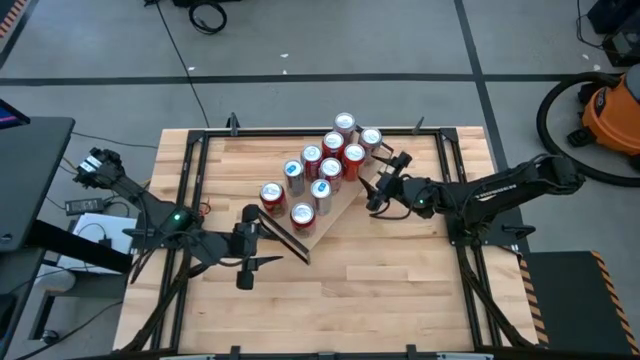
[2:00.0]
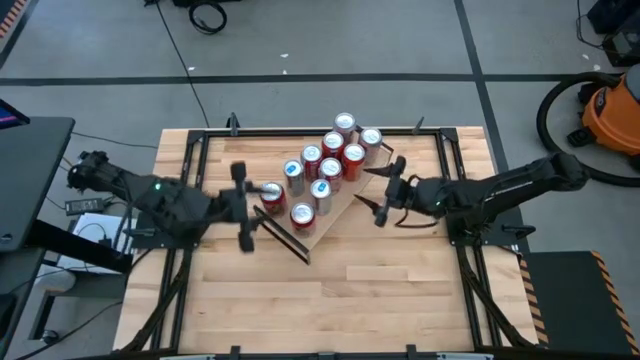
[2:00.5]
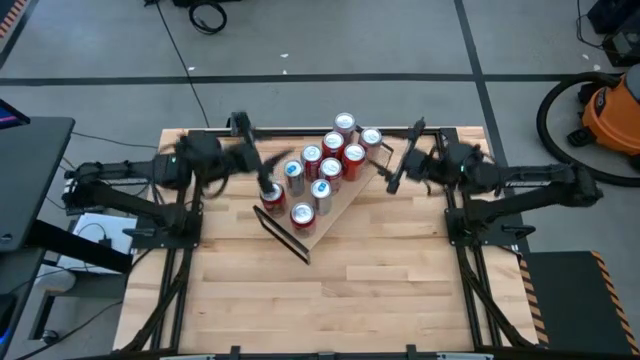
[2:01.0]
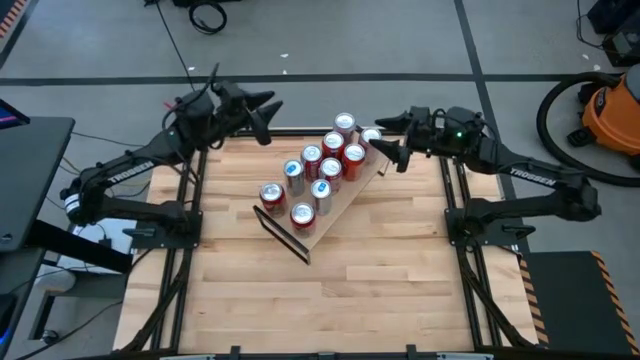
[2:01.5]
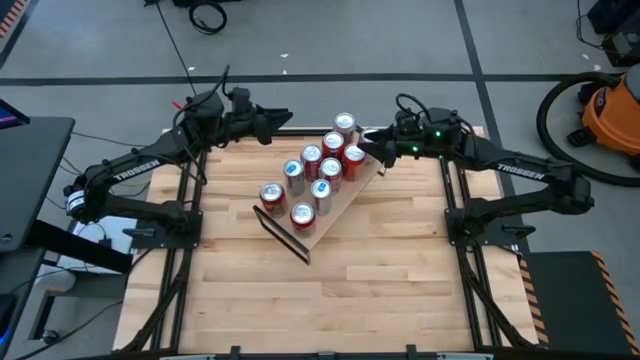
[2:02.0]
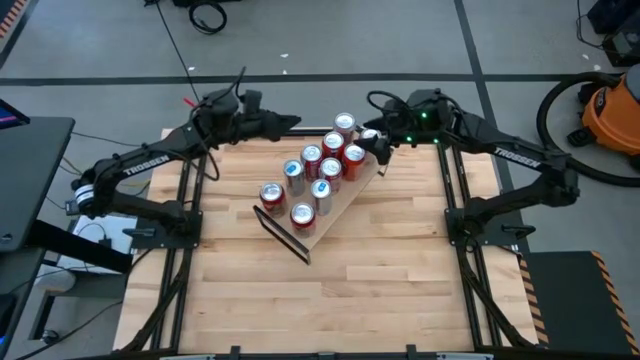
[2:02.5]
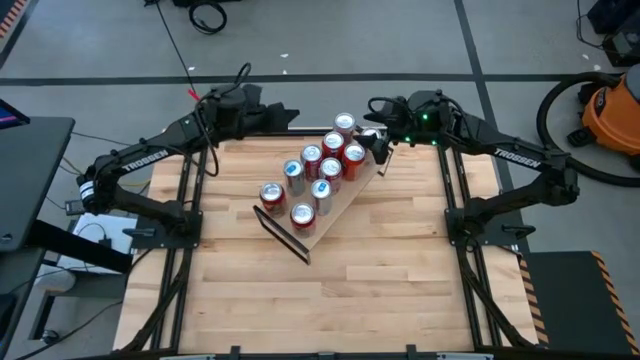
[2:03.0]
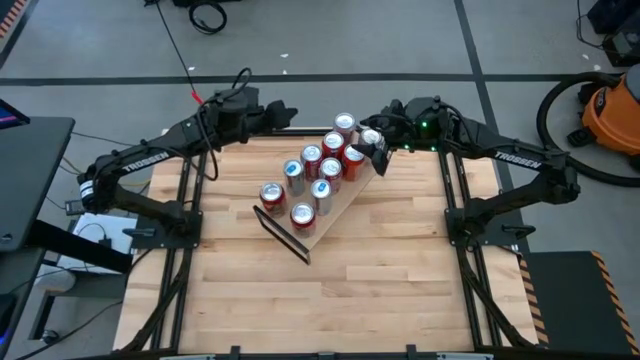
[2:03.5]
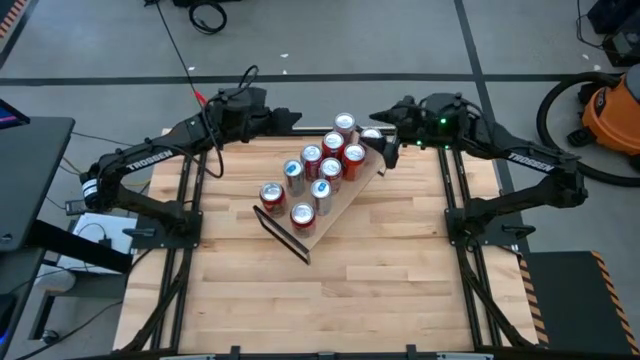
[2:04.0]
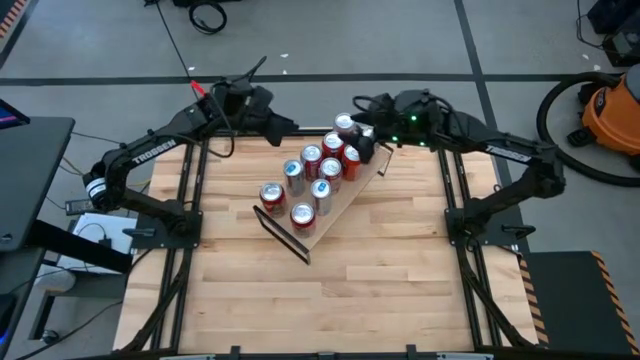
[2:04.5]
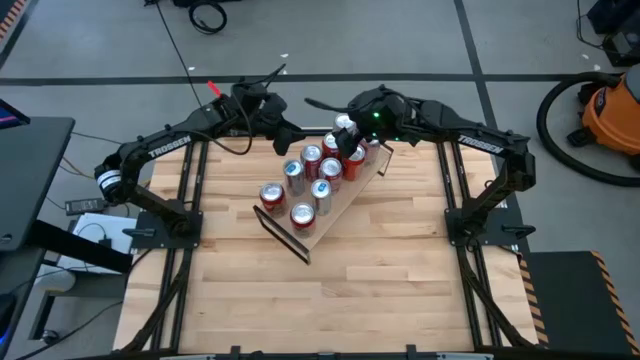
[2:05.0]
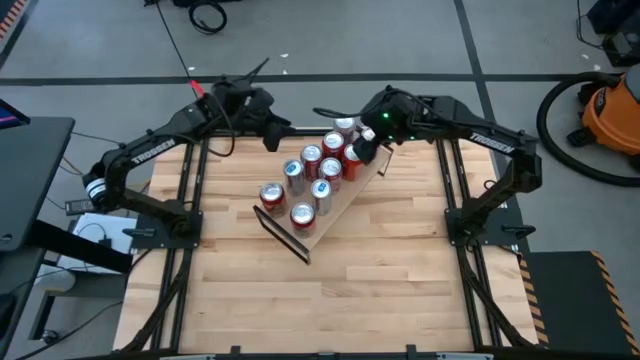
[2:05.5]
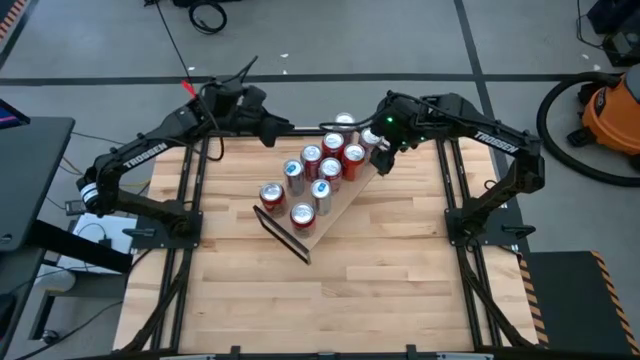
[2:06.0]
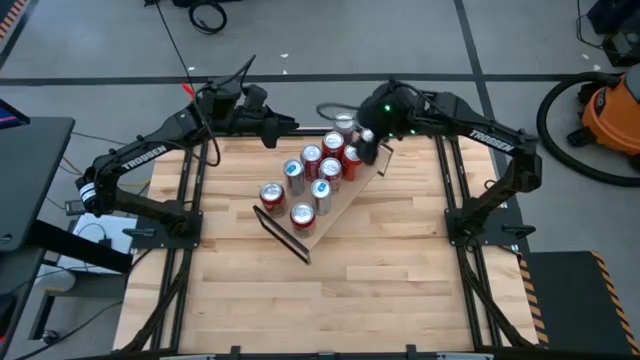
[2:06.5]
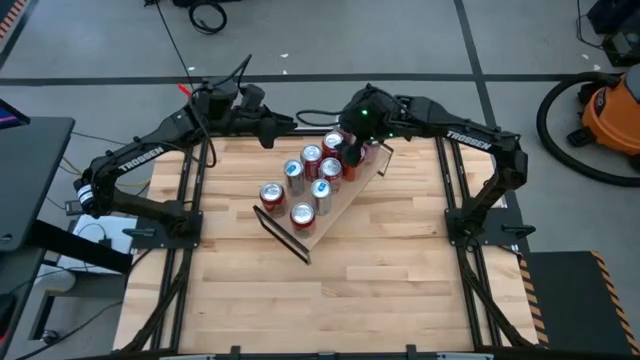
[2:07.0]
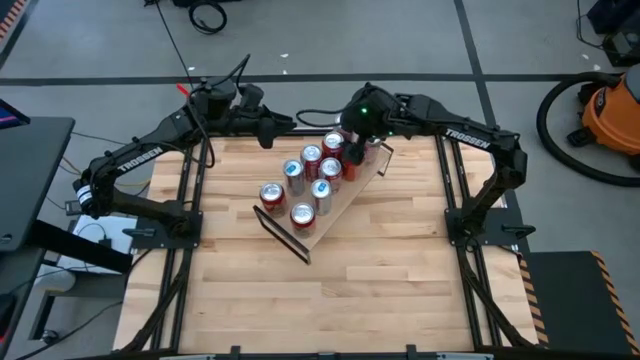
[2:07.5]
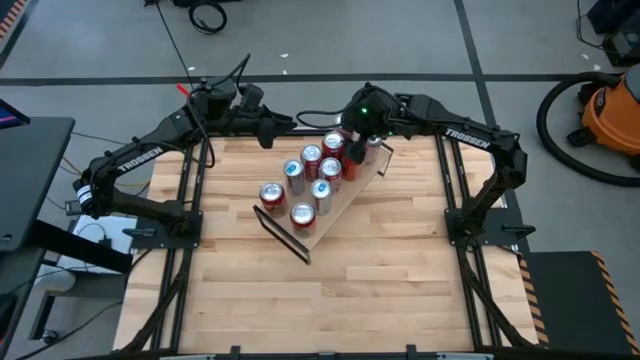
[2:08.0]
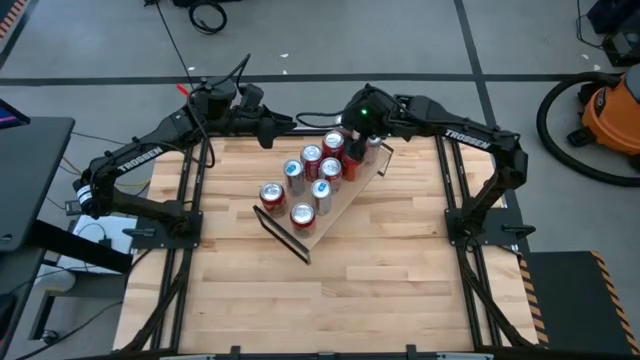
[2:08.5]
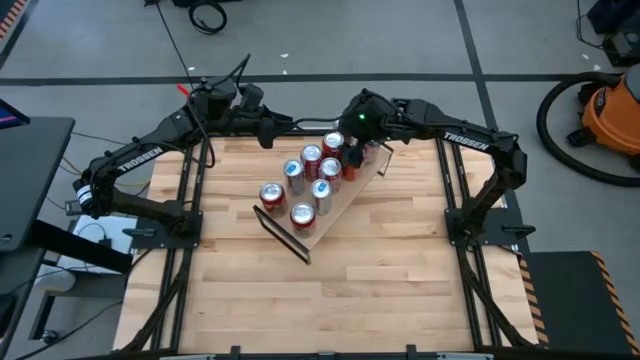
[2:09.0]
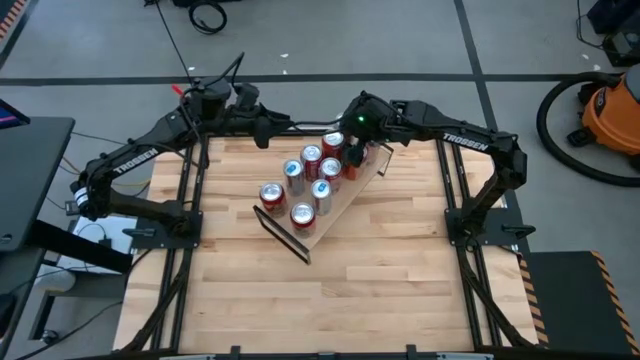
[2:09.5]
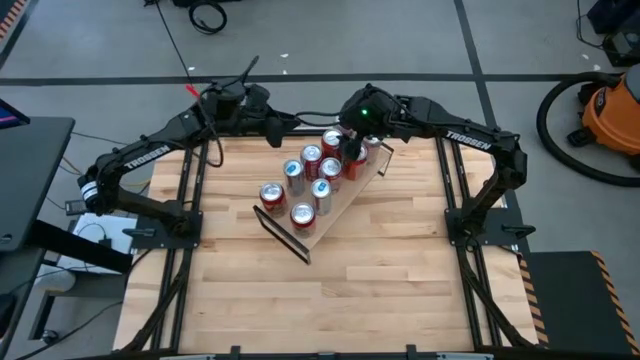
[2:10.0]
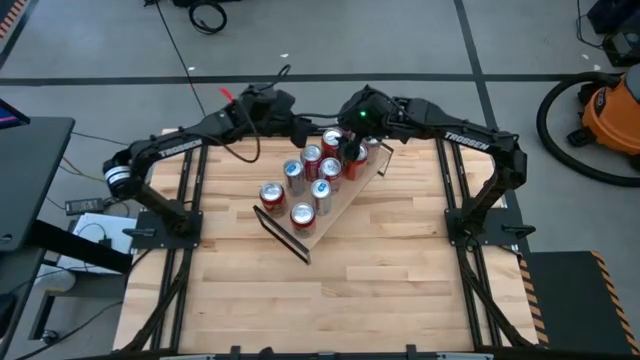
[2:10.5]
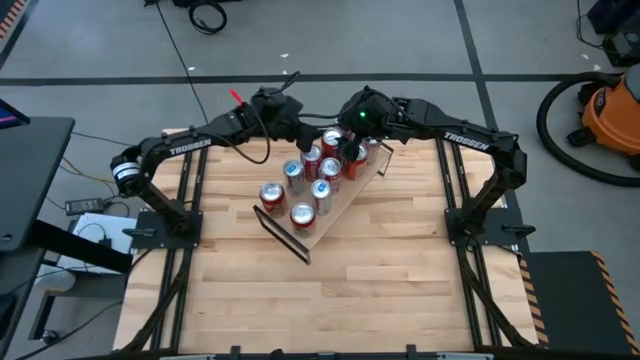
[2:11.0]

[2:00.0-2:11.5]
Task: Place canned beverage on shelf
Adjust the soda cans on the shelf

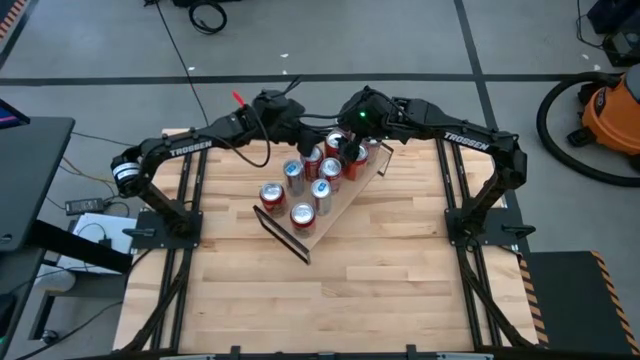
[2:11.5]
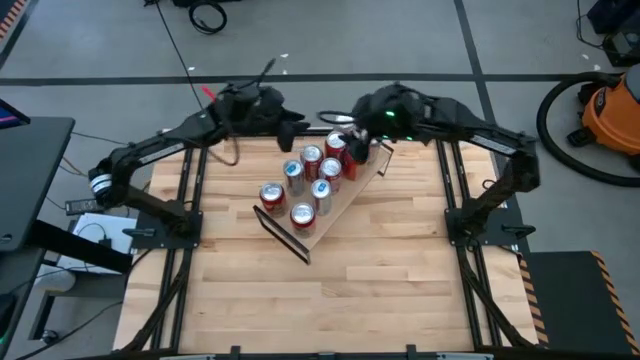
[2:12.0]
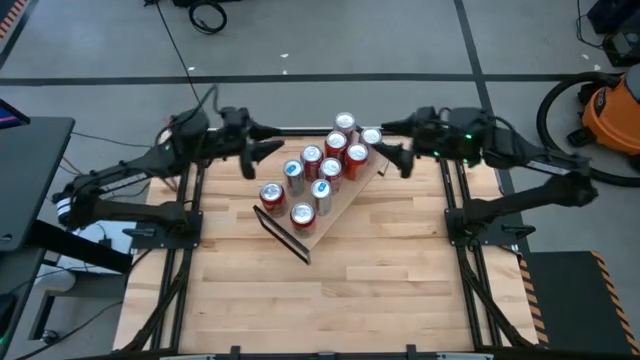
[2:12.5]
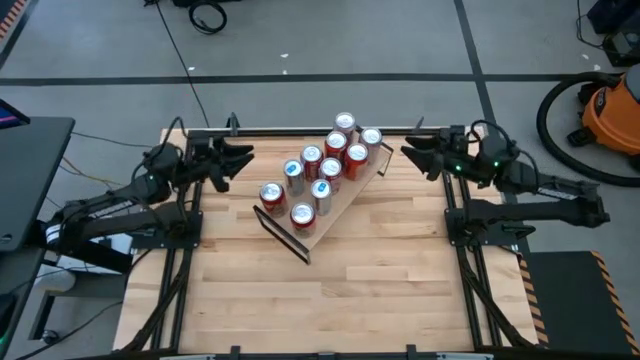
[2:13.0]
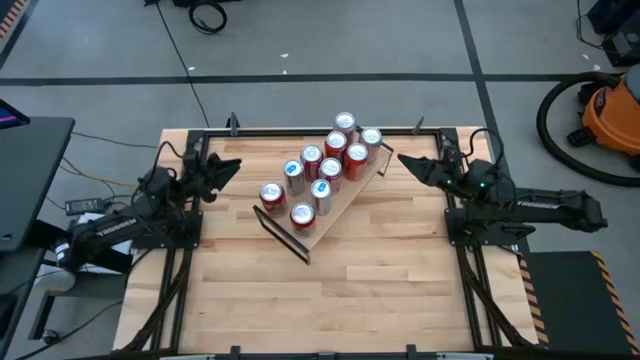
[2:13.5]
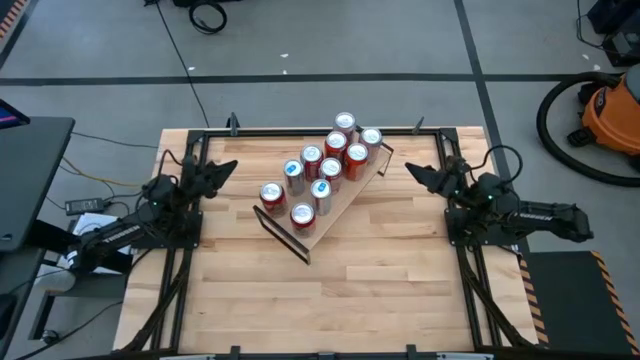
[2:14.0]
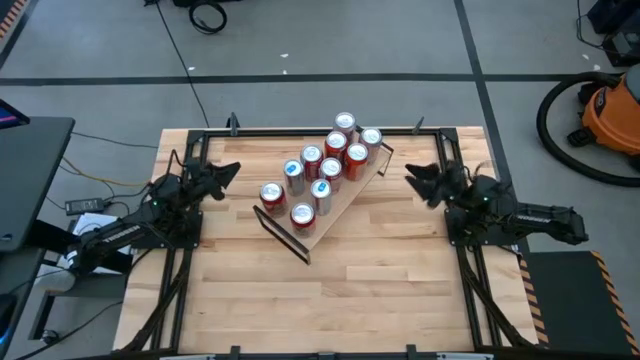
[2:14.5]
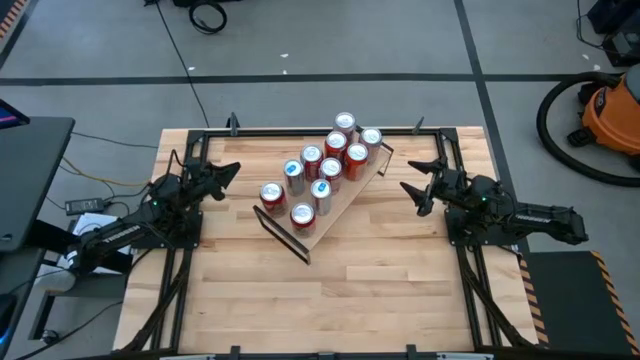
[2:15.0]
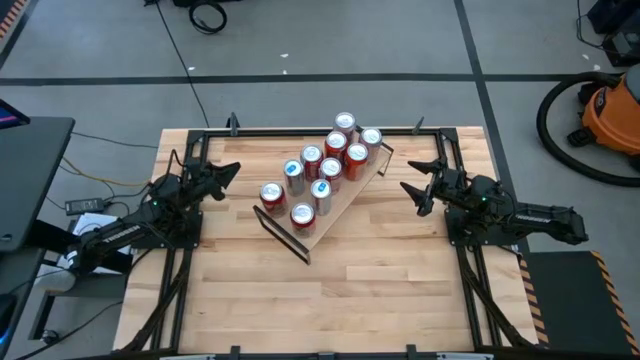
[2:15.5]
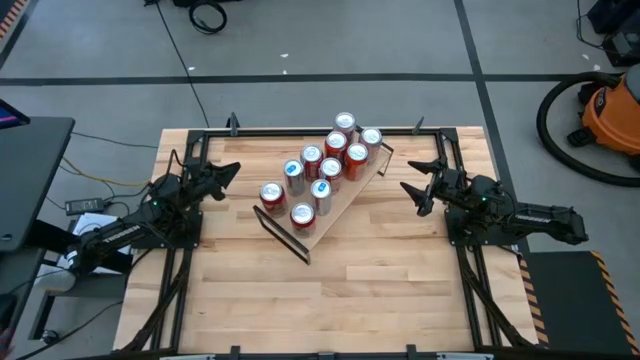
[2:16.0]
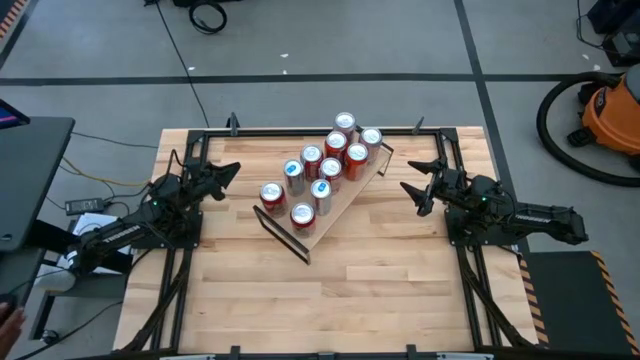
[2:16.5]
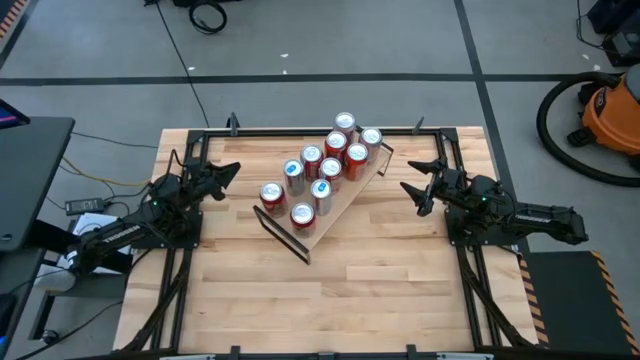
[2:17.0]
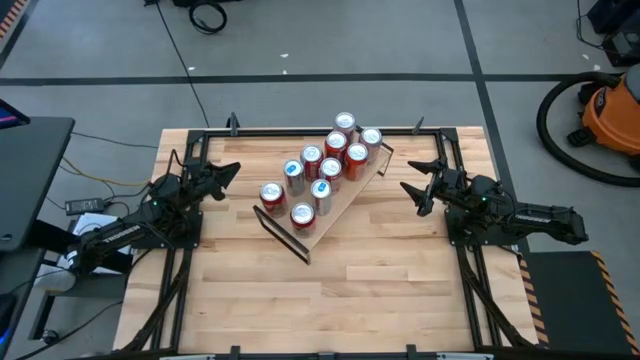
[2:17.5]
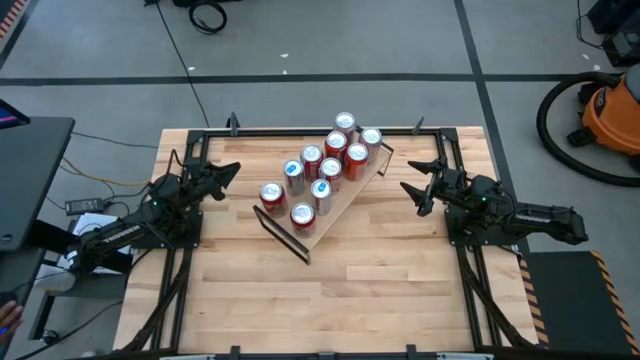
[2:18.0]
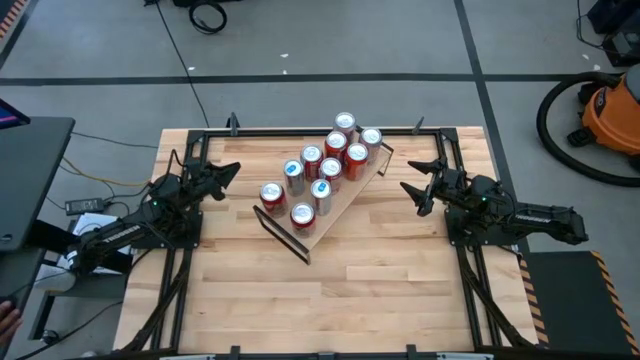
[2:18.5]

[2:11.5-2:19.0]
Return to Home Position
